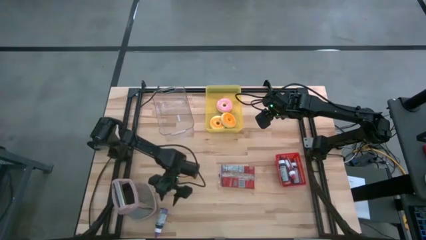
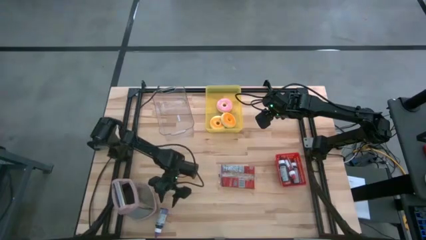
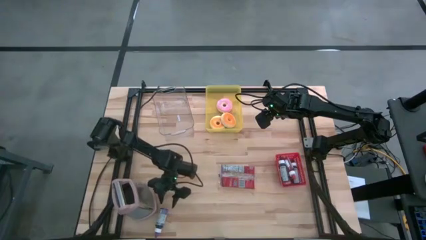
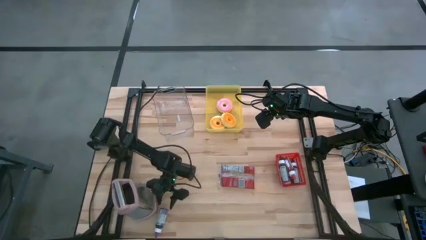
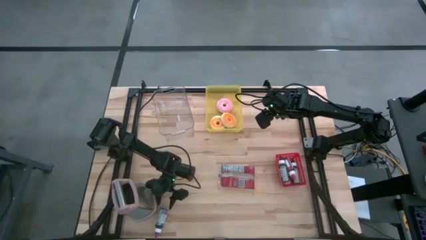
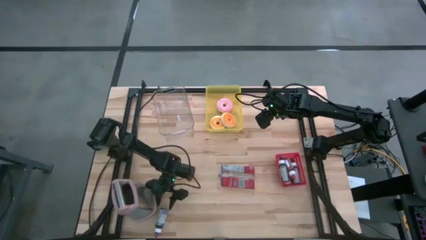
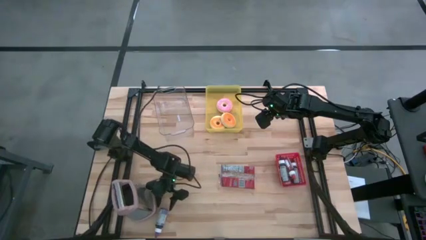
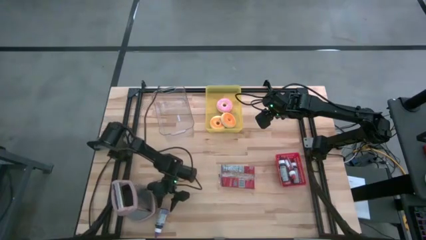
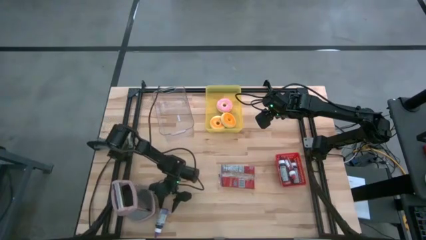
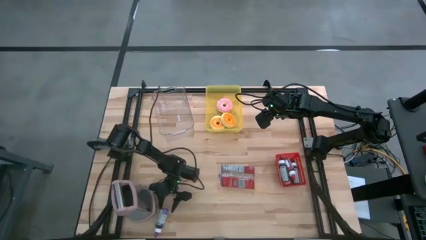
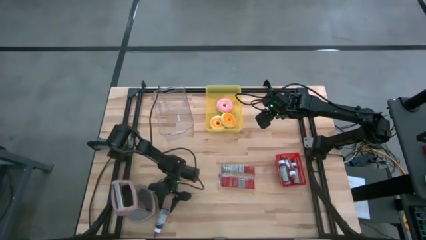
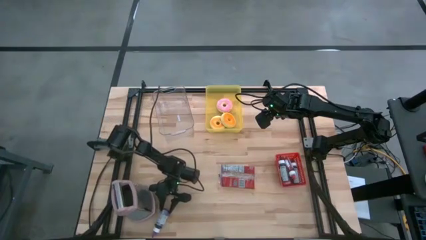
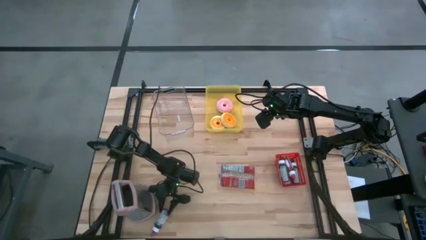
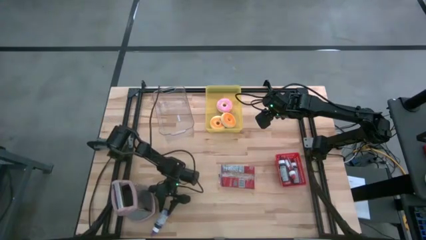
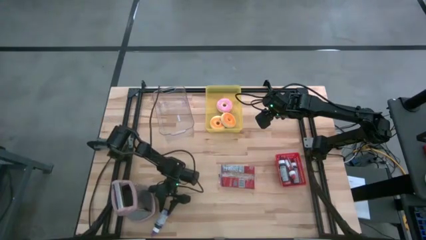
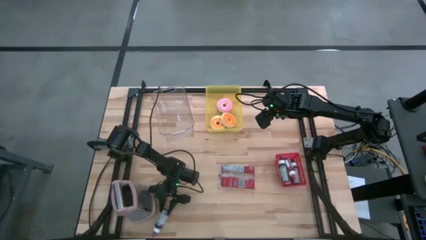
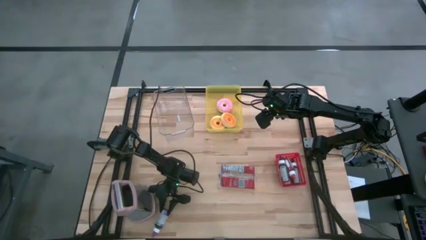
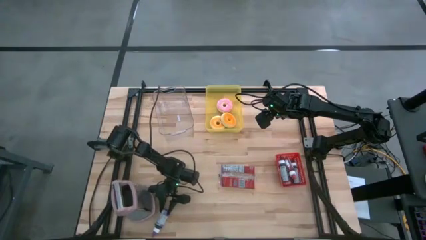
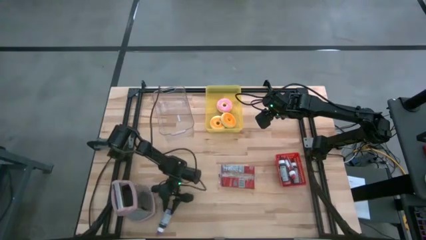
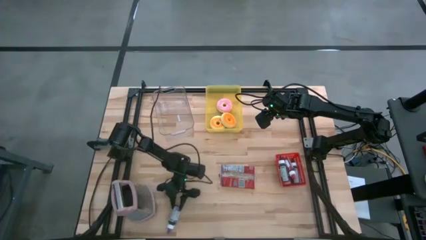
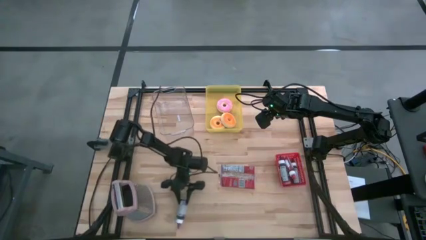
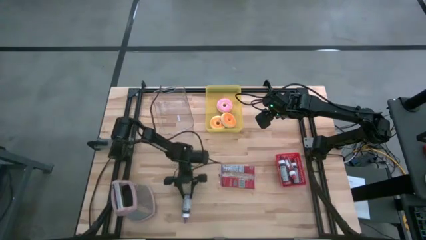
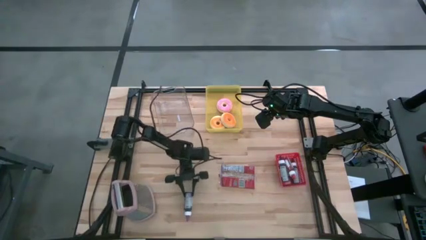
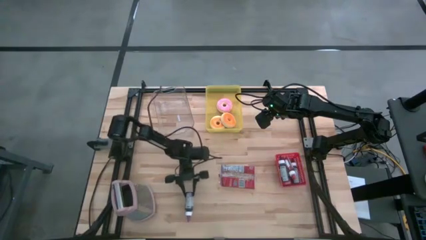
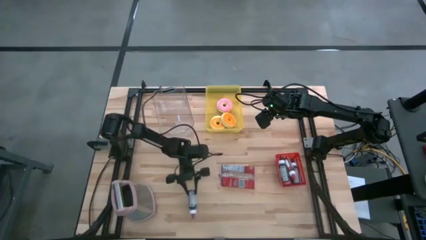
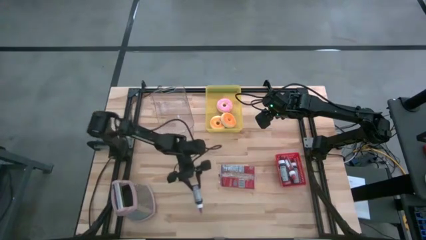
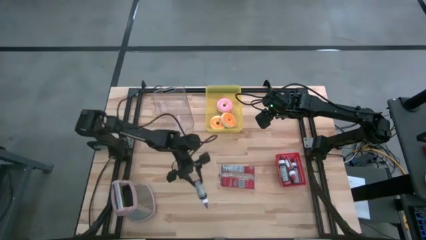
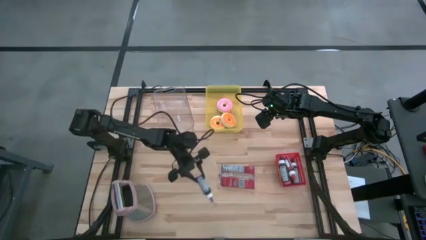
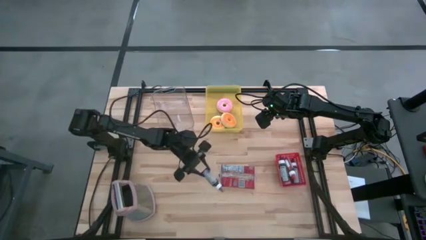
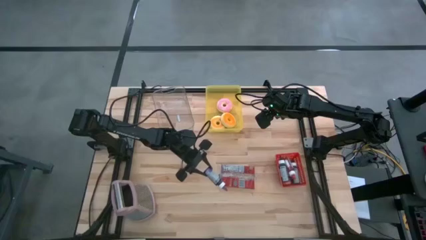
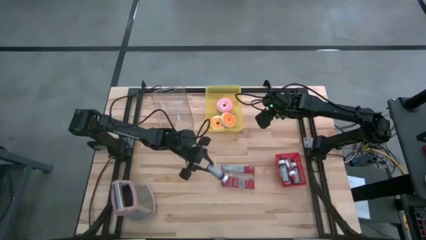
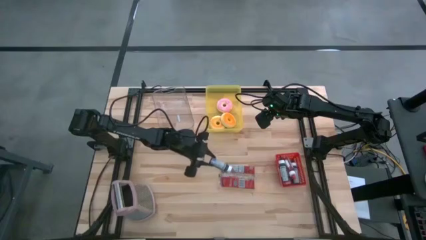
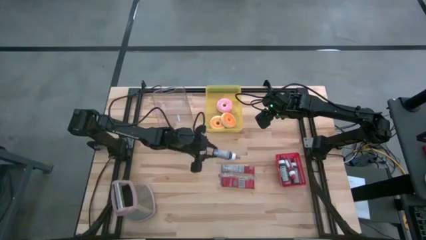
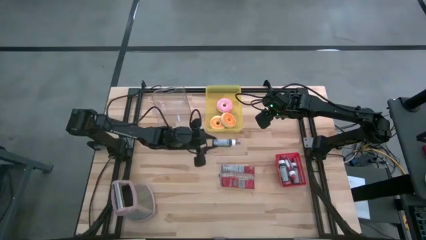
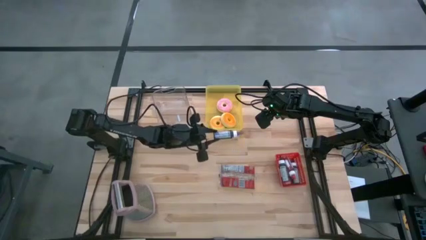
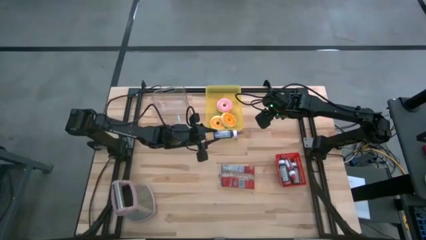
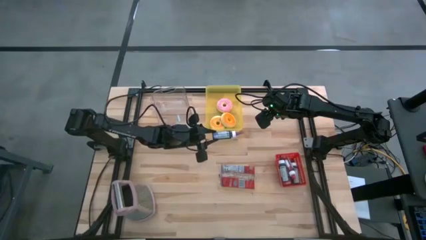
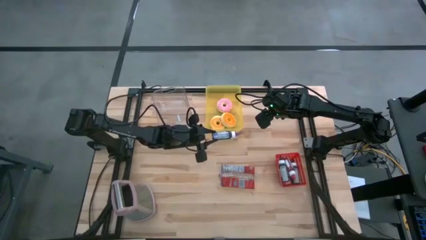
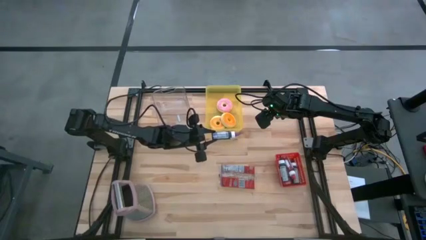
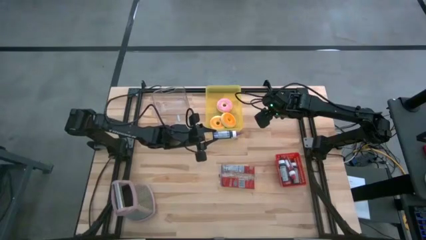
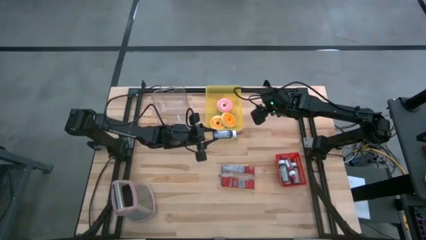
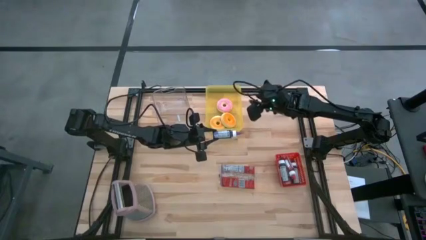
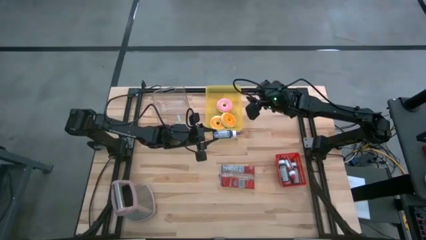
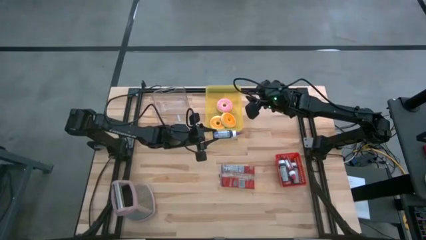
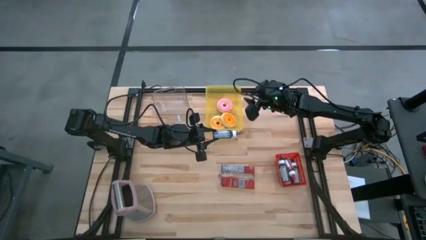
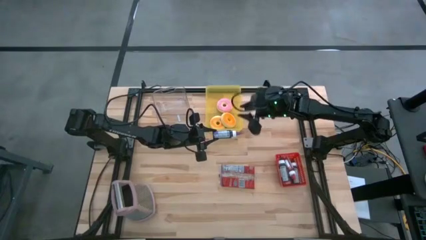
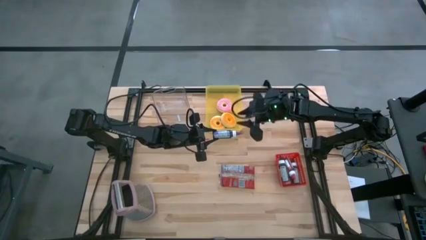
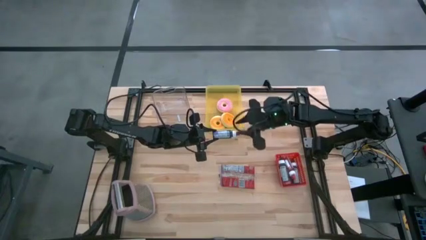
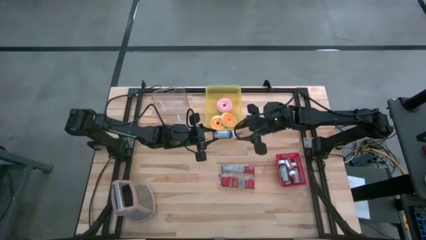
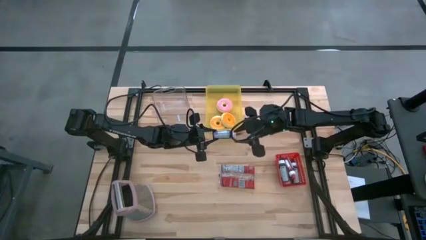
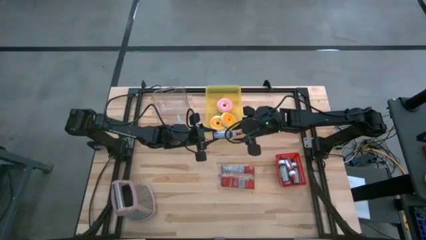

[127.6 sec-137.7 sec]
Task: Pick & Place Food Item
Put the violet food coloring bottle into the red bin

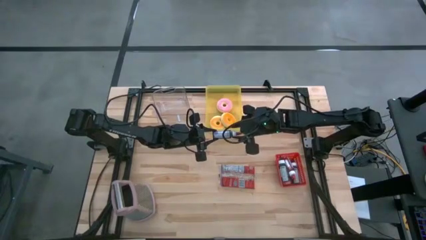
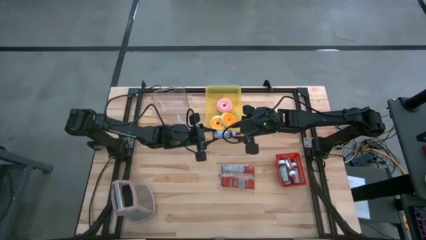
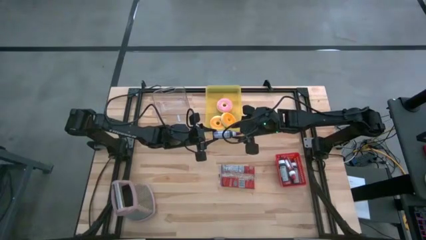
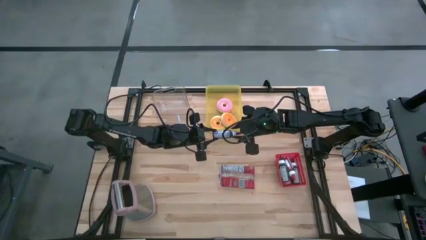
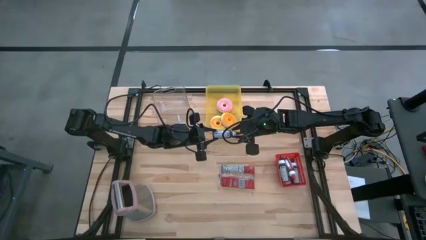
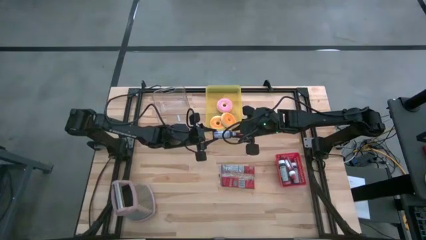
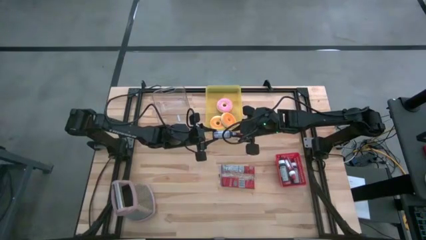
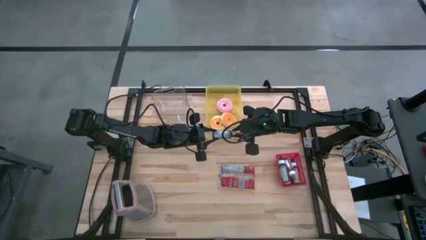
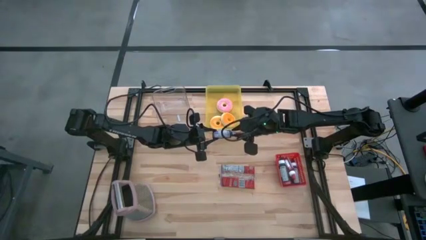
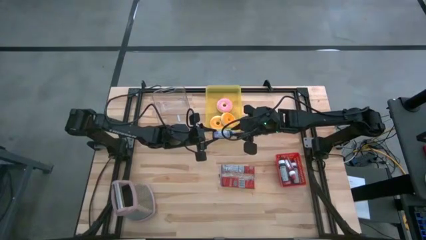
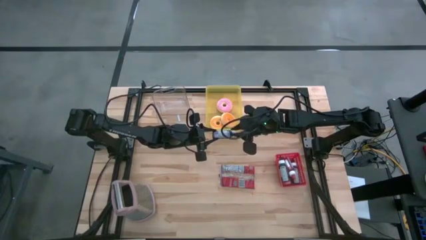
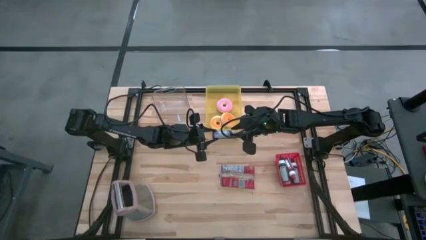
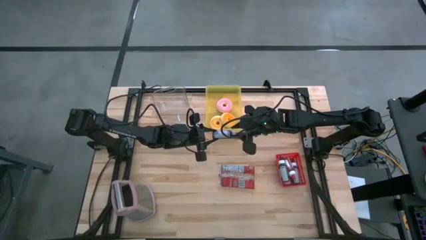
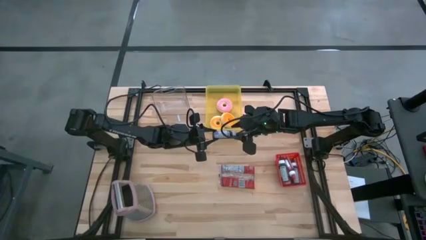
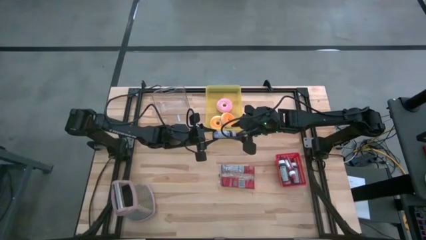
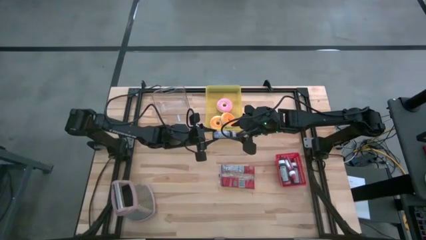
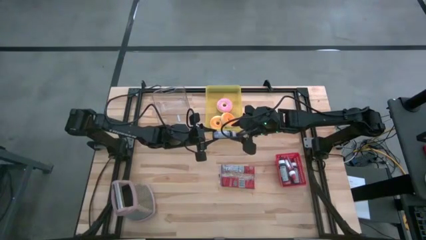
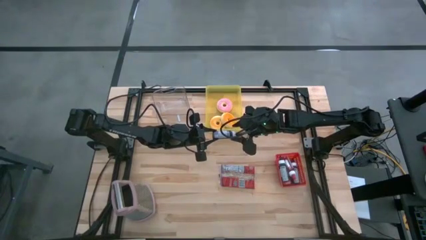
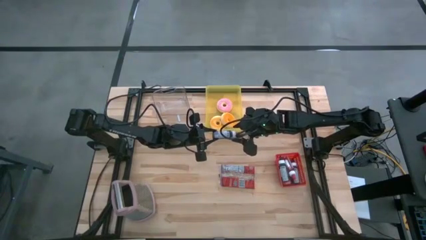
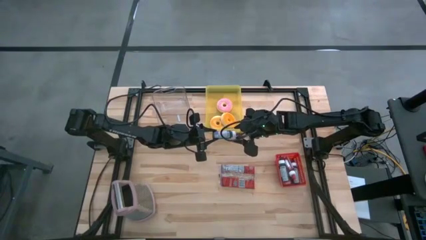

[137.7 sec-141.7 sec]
Put the violet food coloring bottle into the red bin
